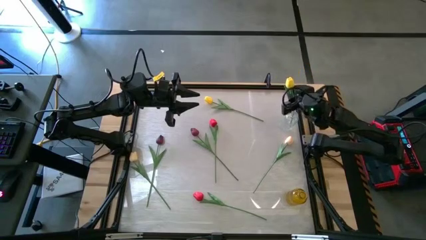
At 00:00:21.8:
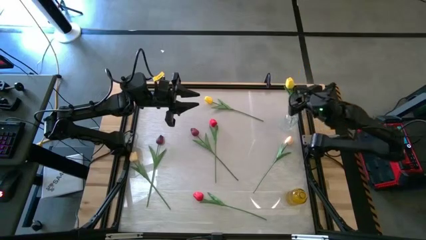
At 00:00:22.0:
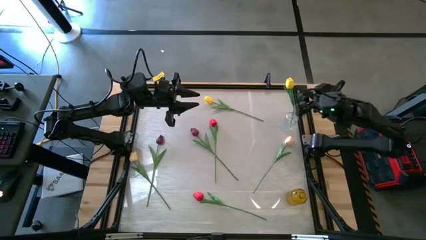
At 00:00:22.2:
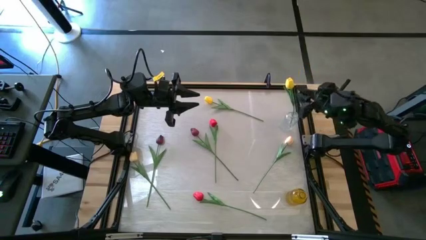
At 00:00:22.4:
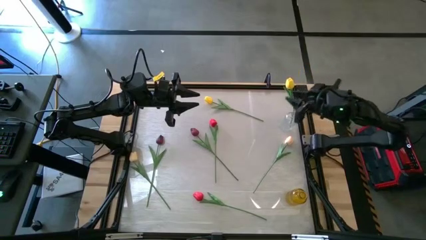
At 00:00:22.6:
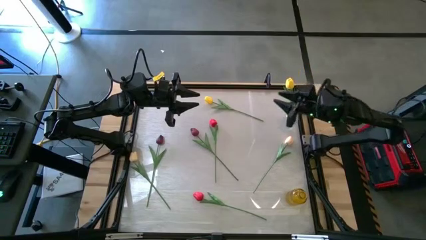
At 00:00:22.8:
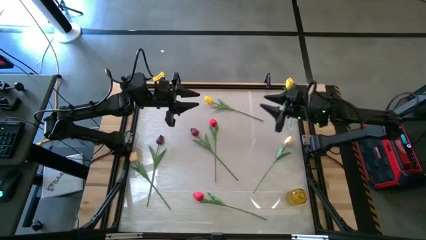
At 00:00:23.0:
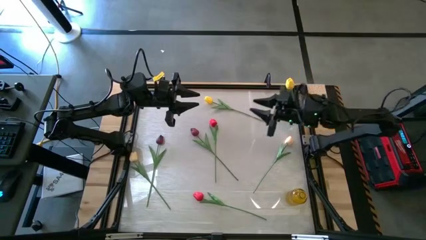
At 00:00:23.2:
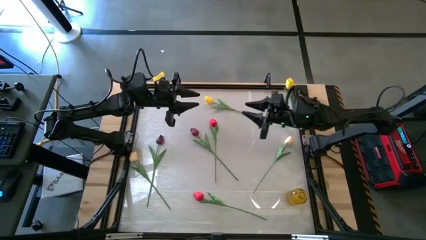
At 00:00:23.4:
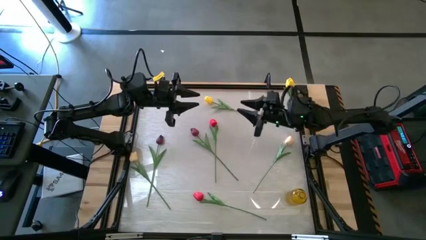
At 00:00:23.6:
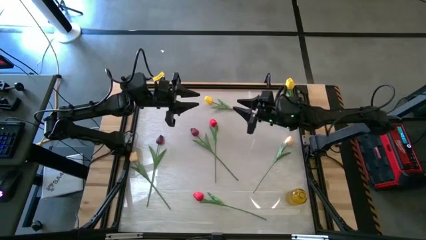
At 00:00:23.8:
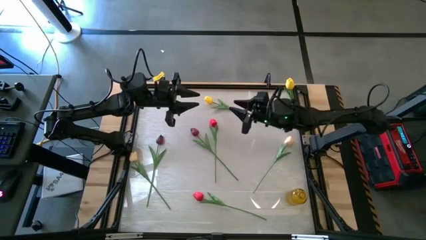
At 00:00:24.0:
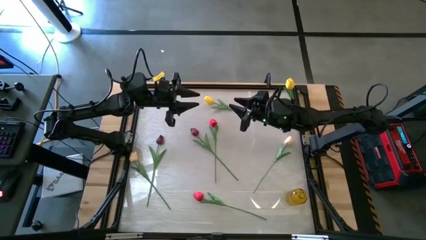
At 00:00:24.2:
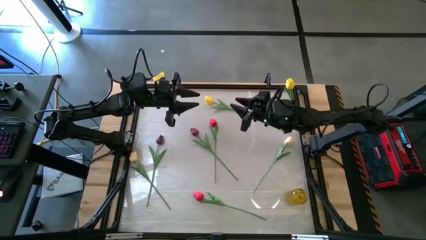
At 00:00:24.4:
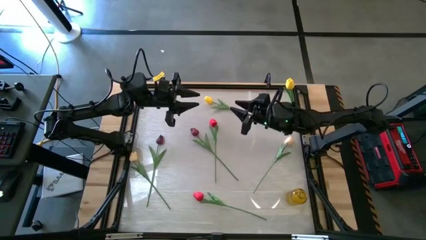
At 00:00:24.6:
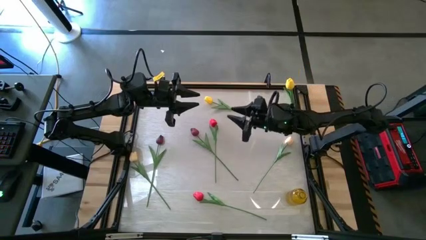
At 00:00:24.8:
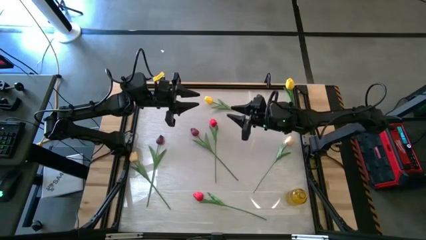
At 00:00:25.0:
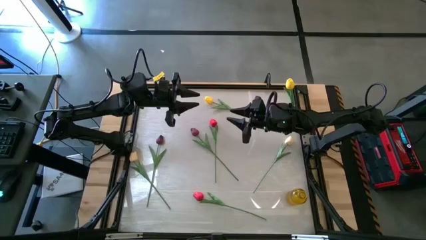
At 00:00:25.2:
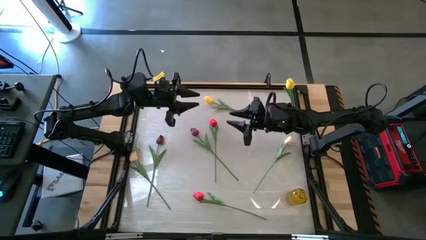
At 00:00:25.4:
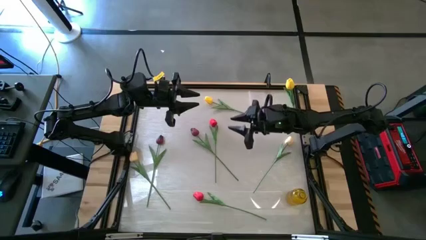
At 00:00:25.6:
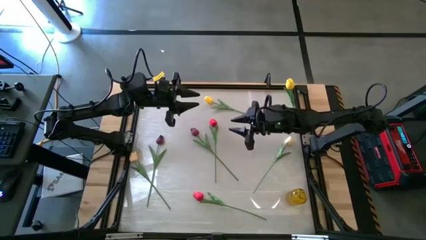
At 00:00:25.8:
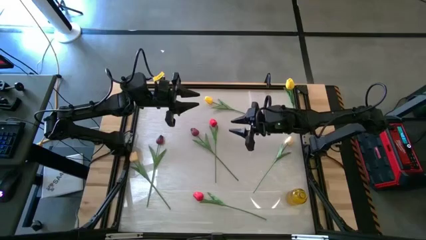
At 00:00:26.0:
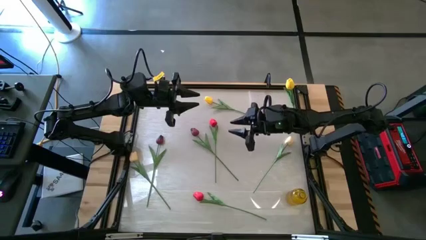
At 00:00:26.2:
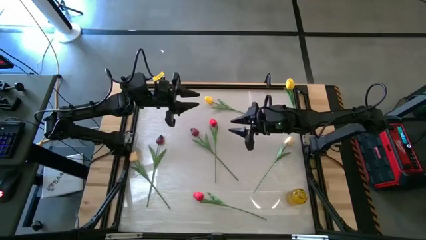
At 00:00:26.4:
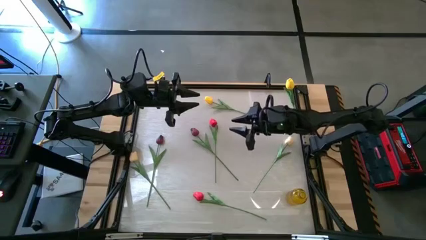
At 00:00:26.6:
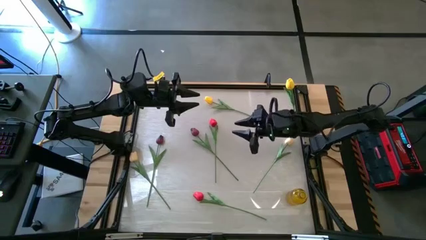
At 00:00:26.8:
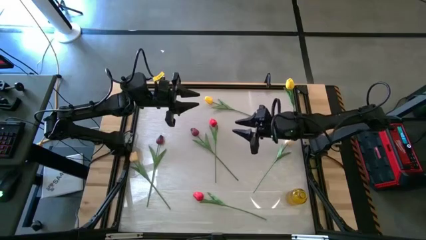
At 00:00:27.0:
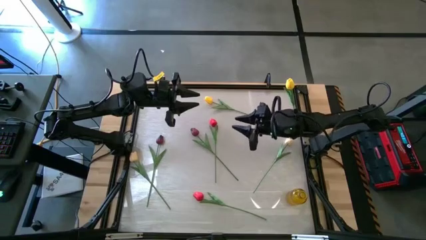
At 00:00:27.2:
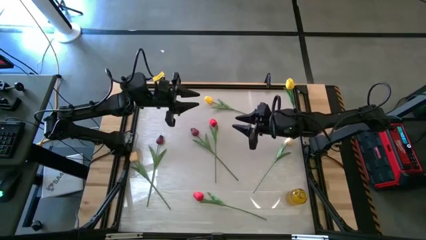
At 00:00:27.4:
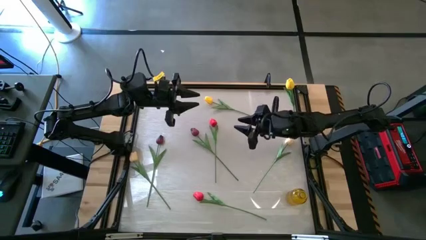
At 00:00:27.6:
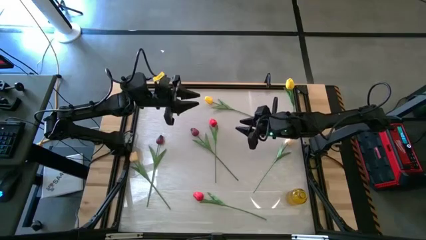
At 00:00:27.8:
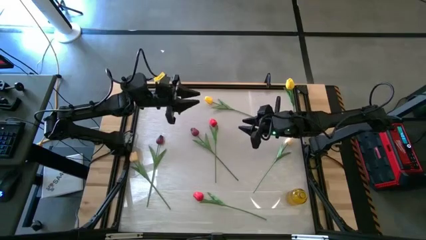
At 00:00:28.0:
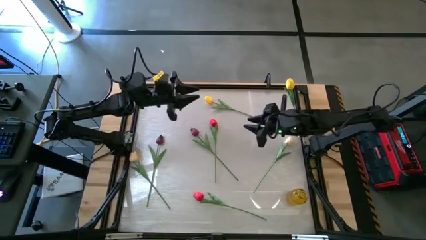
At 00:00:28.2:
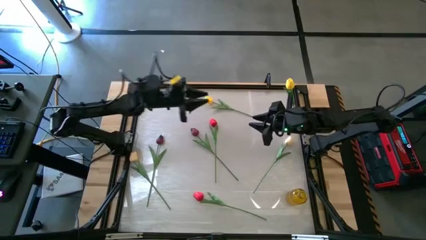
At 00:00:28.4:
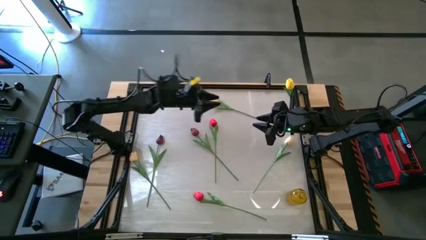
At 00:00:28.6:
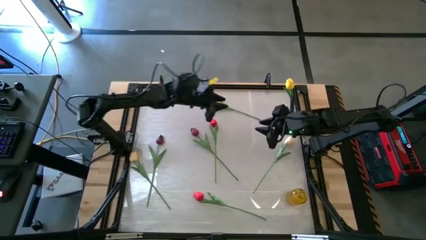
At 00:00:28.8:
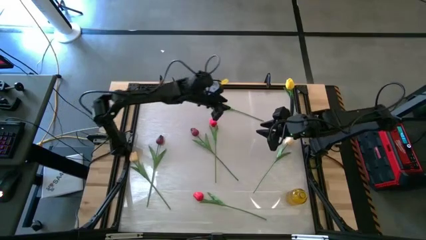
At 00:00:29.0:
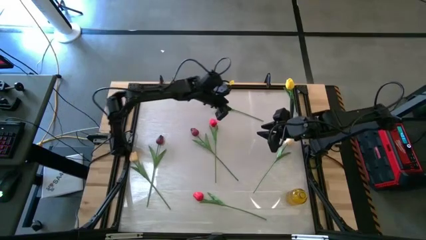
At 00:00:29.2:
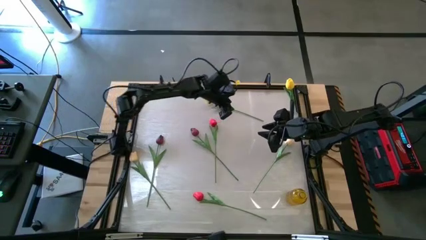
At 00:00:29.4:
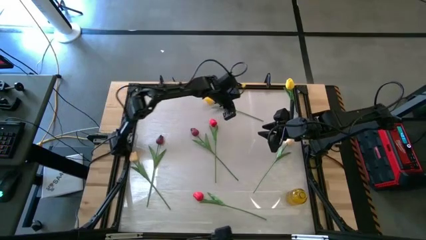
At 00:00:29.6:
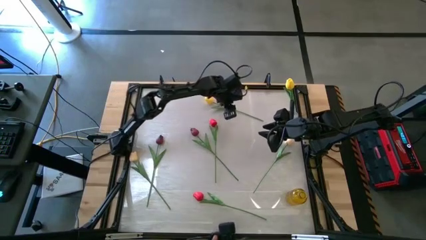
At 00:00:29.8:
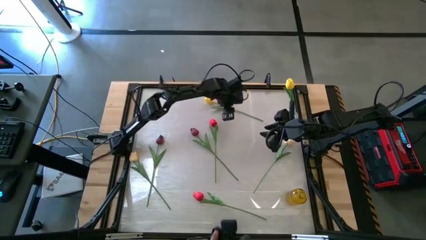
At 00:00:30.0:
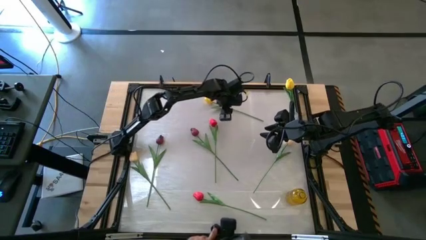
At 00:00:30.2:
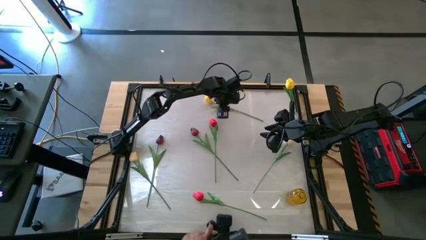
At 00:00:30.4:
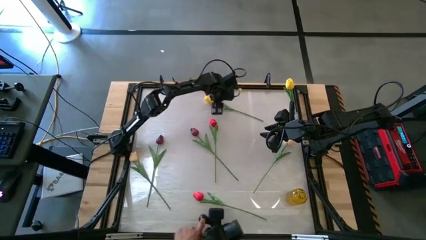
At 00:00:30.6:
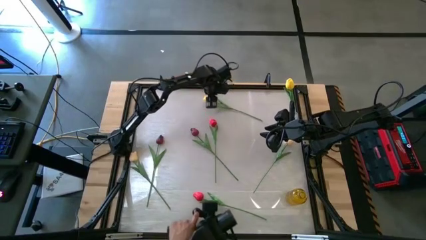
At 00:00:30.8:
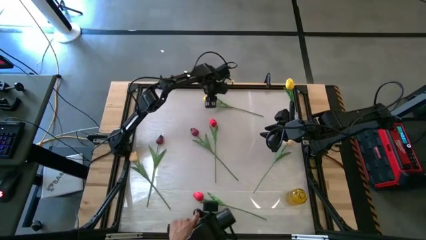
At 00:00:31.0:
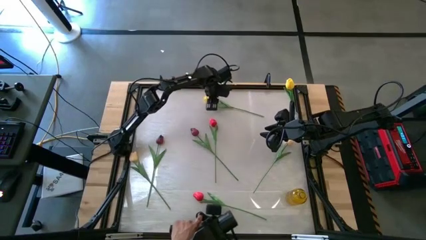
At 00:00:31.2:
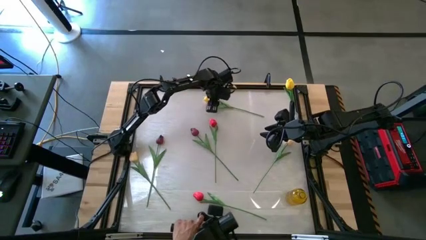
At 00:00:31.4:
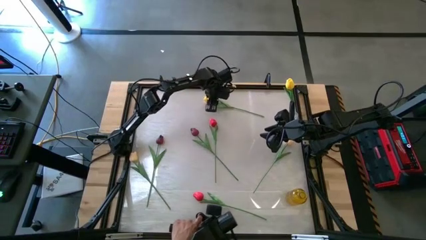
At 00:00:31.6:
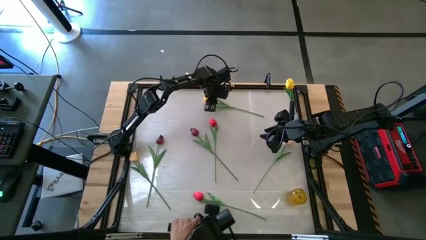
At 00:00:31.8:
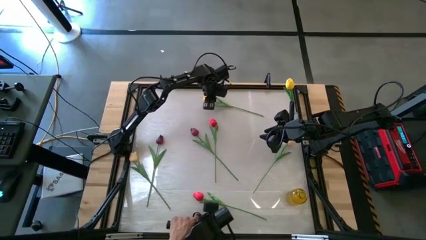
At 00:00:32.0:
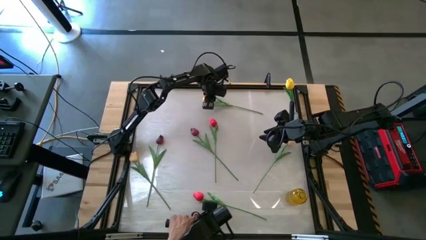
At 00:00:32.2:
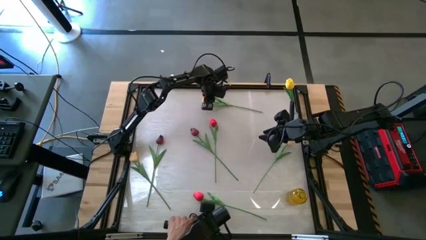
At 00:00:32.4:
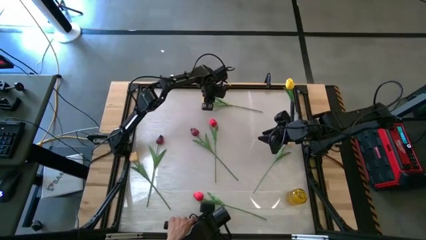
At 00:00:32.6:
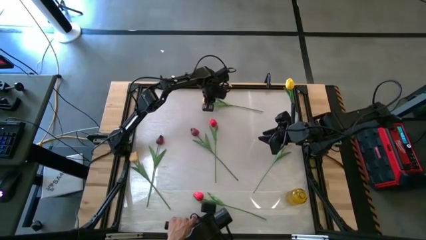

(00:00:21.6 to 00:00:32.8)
Task: Sort flowers into vase by color
Put the yellow tulip into the transparent vase
